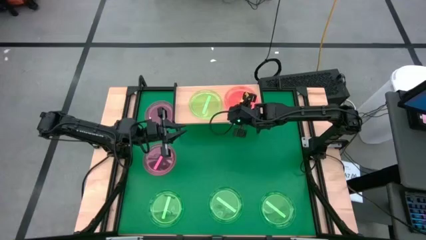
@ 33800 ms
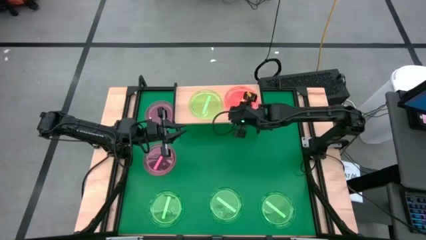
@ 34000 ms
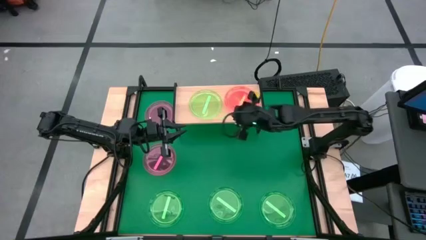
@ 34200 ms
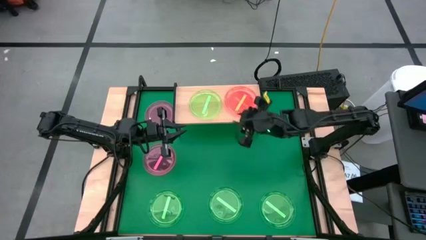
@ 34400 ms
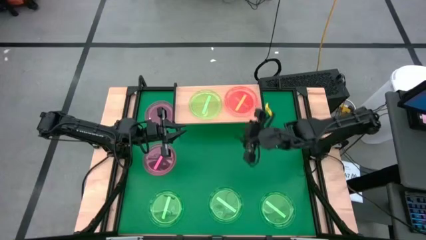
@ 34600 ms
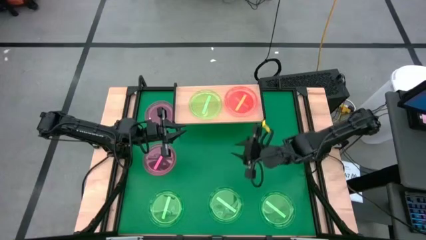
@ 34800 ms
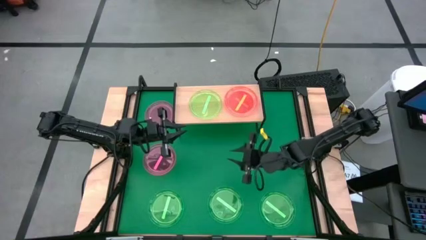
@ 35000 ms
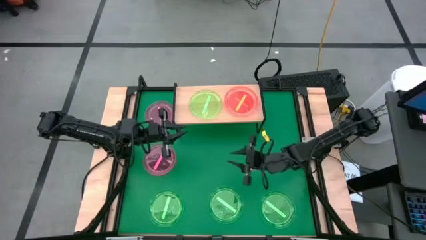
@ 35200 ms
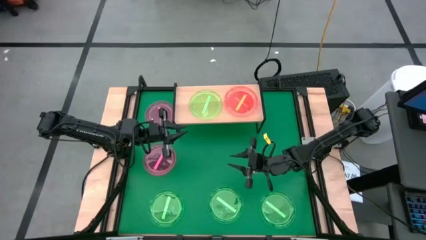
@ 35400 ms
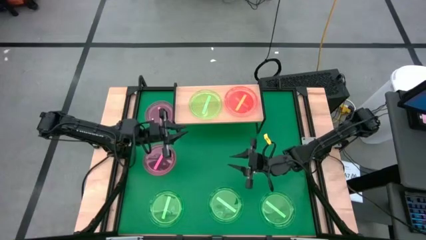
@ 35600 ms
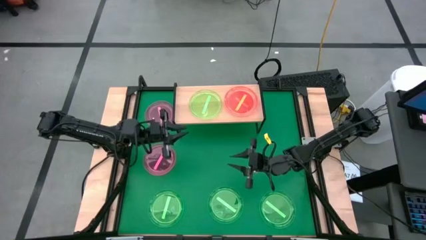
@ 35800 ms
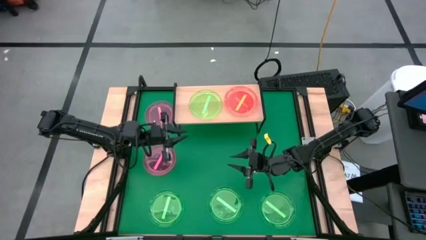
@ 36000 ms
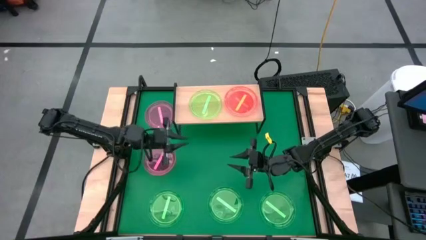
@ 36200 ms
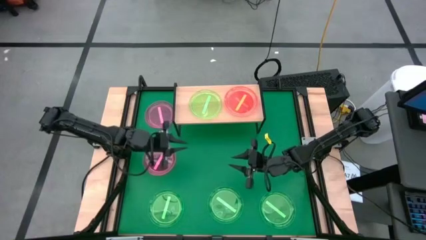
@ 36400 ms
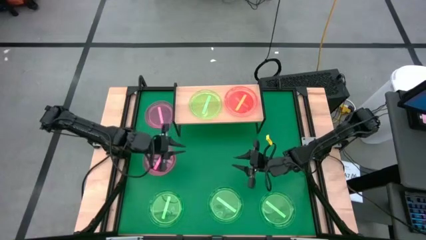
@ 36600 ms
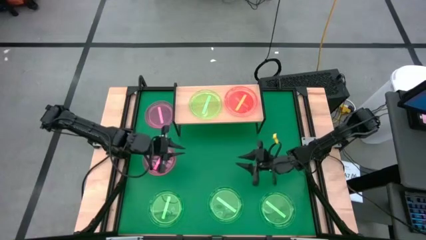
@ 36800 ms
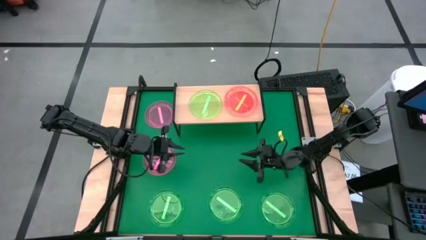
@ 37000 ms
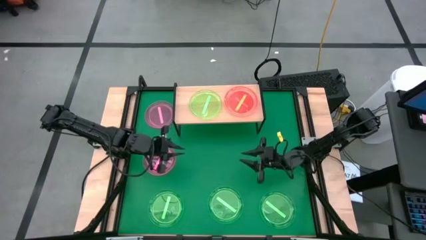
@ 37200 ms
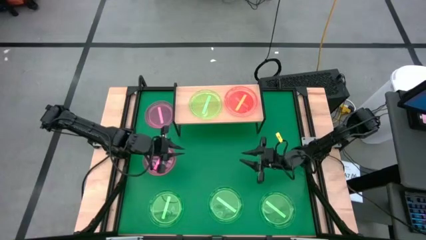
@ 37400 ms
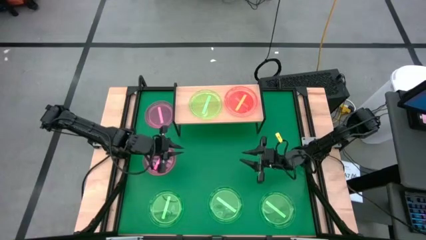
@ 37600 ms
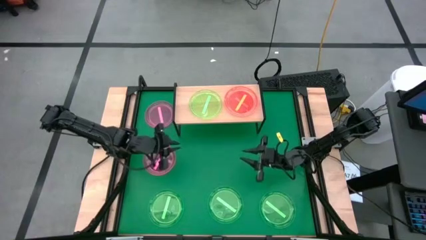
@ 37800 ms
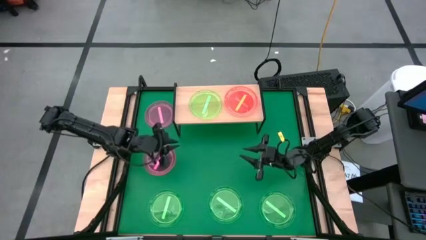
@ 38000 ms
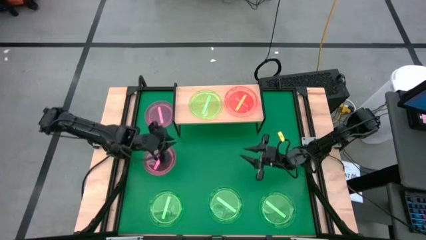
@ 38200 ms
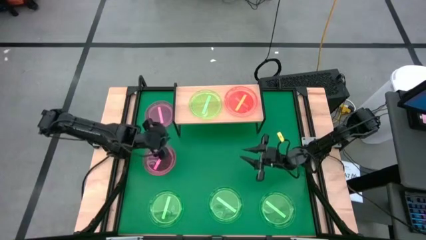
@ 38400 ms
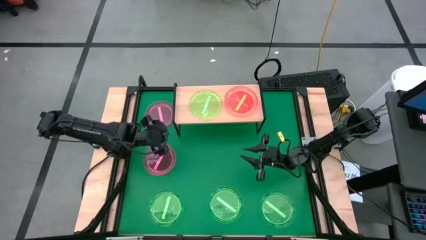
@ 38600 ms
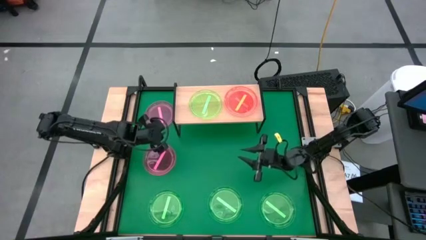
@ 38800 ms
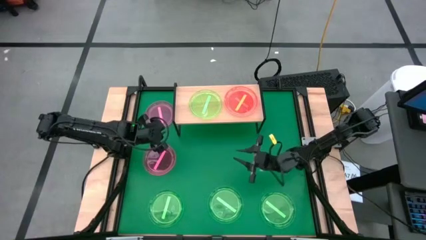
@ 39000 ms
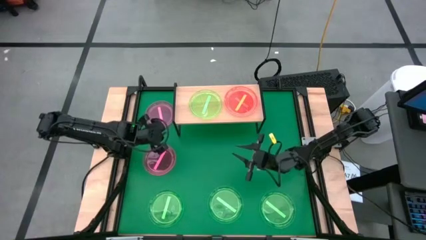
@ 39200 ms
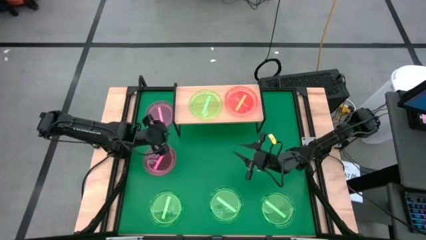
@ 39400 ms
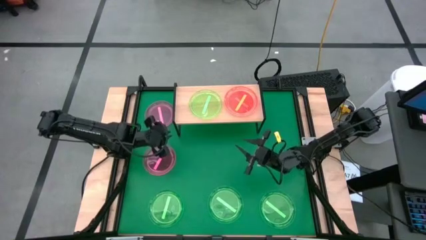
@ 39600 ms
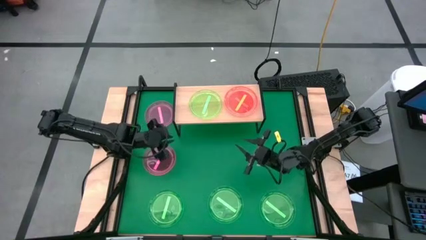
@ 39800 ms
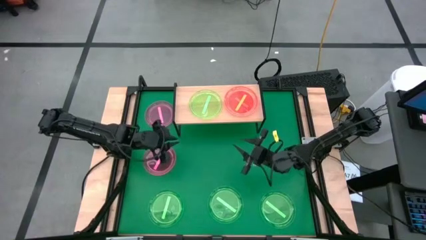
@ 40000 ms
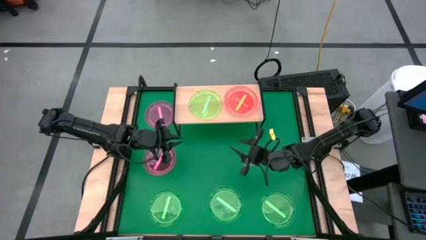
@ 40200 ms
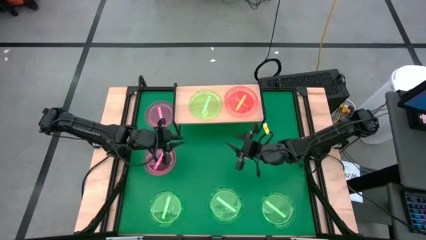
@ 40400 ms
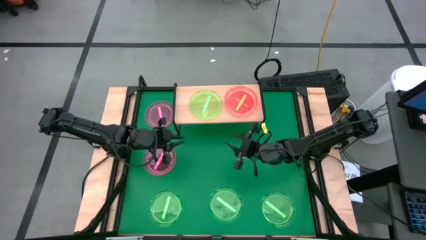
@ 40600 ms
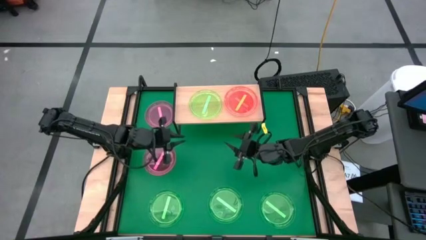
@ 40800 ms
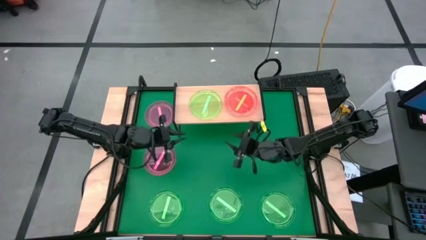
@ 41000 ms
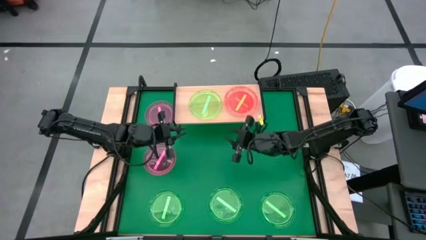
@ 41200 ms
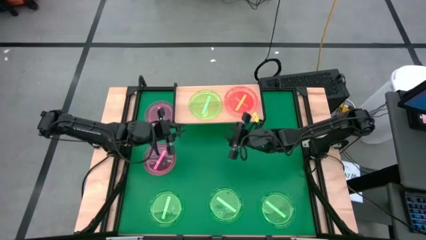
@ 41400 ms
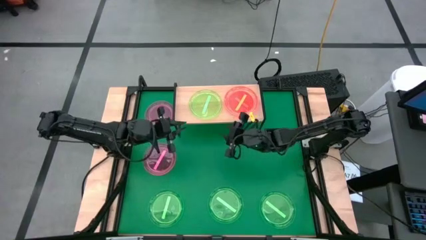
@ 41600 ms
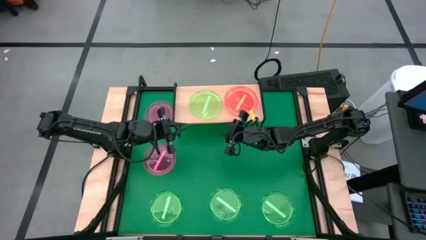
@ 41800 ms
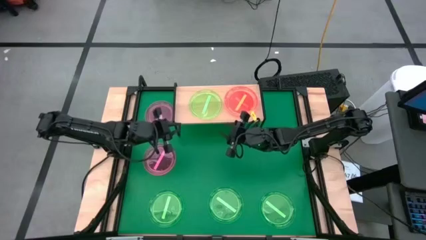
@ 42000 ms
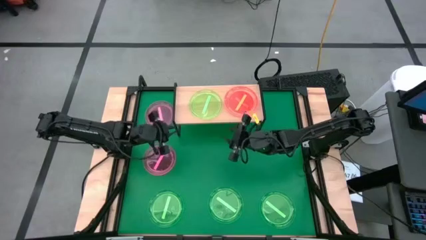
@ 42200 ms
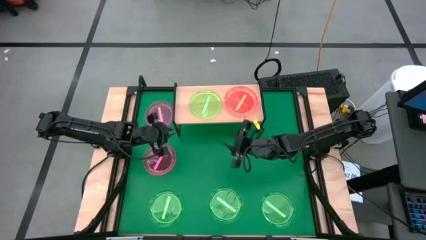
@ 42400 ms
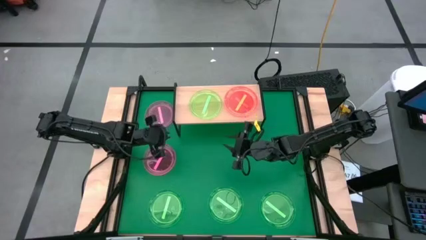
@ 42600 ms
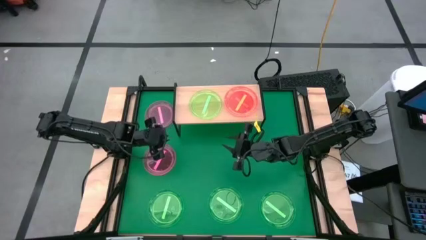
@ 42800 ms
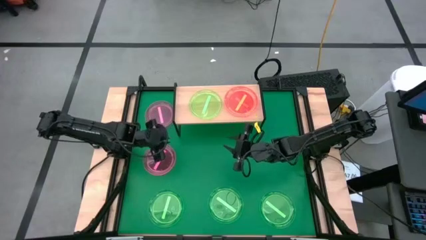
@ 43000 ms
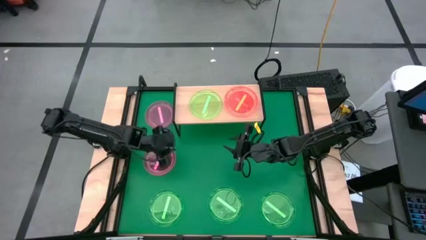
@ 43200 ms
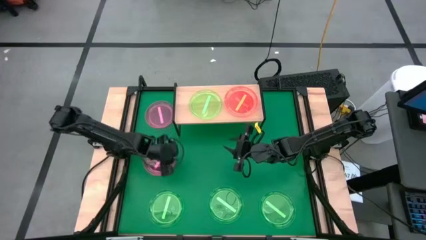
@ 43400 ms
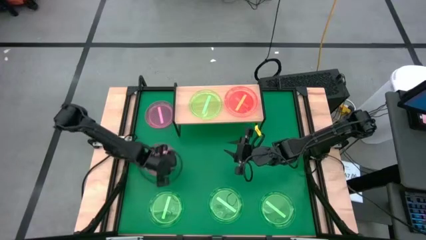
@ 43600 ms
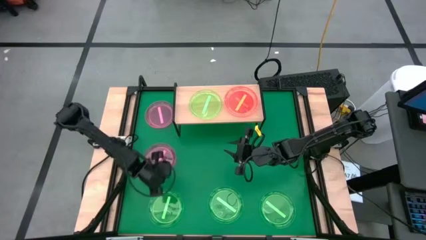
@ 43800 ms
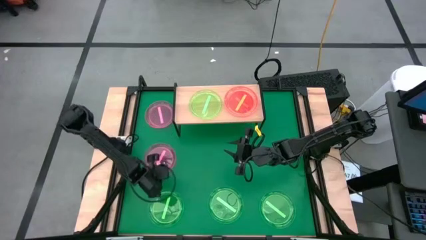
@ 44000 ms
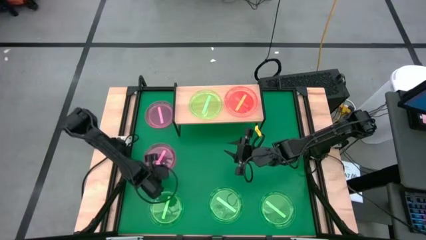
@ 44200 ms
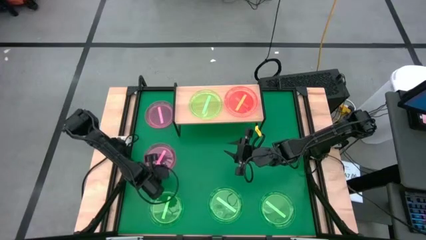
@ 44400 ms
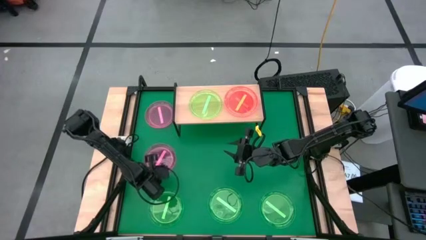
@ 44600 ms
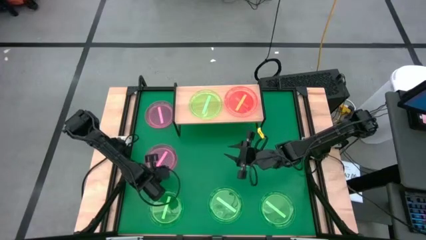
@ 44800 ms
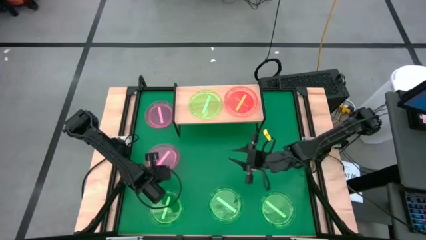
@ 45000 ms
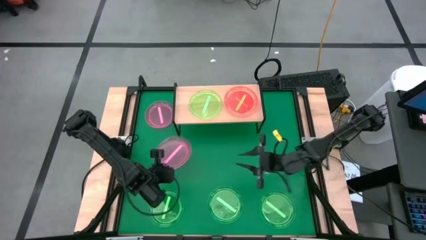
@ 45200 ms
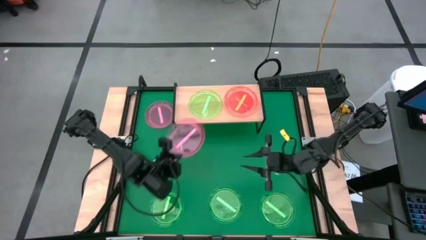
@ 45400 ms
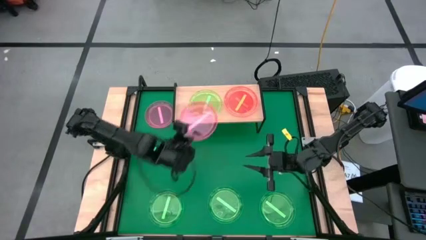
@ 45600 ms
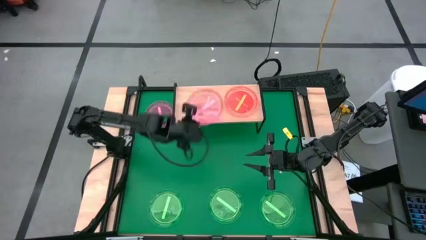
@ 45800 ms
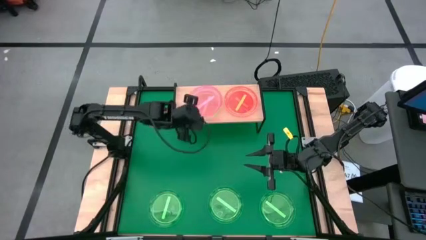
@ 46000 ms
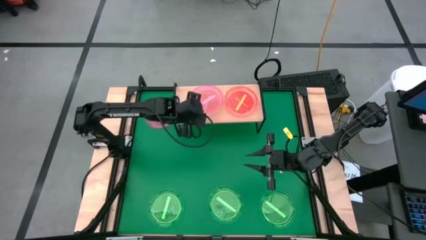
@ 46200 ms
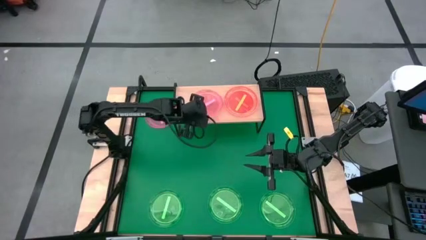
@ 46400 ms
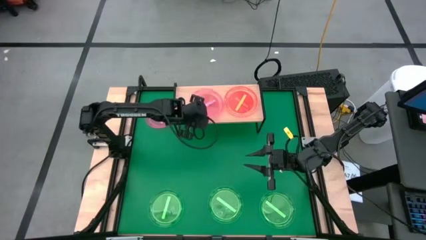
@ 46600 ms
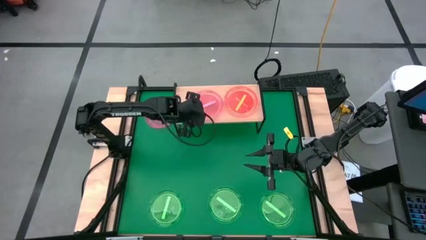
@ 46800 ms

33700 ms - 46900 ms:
Task: Place and stack plates onto a shelf
Stack the bottom pink transparent plate on top of the green transparent plate on the shelf

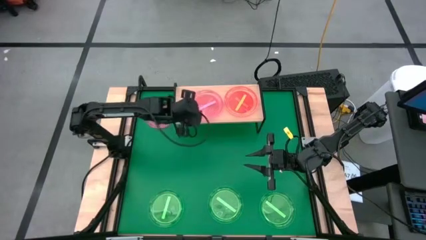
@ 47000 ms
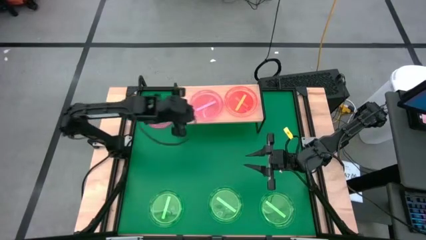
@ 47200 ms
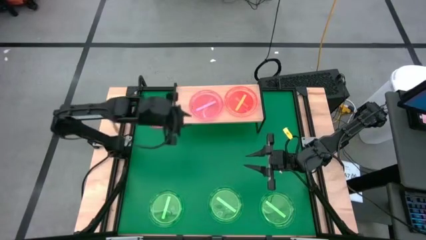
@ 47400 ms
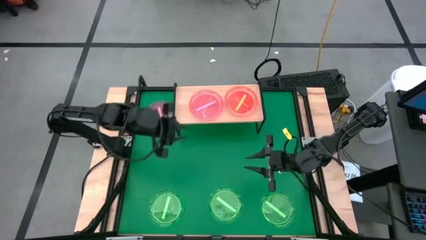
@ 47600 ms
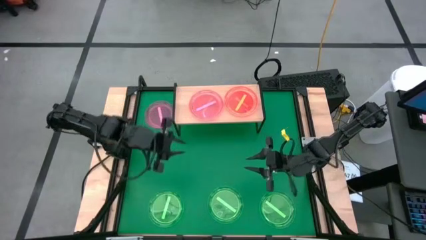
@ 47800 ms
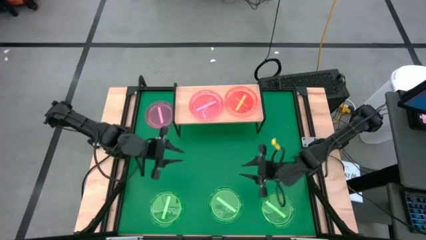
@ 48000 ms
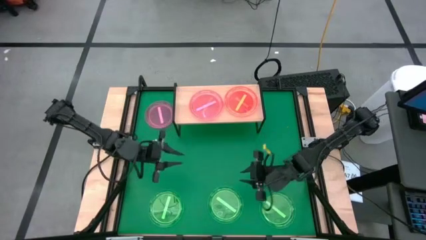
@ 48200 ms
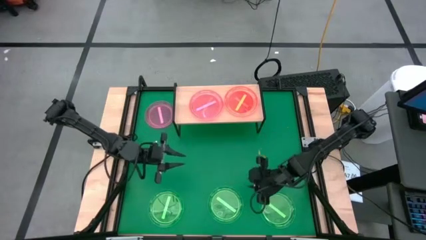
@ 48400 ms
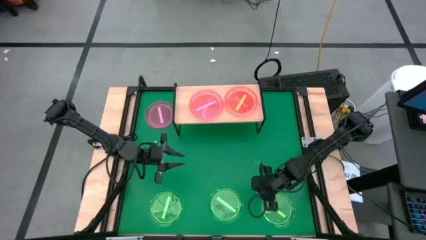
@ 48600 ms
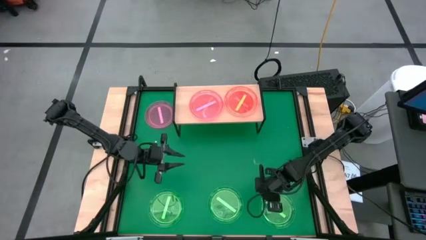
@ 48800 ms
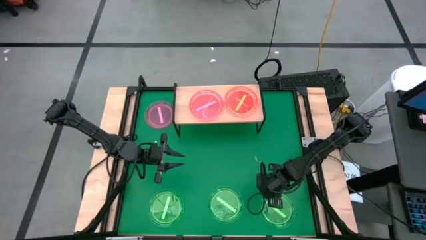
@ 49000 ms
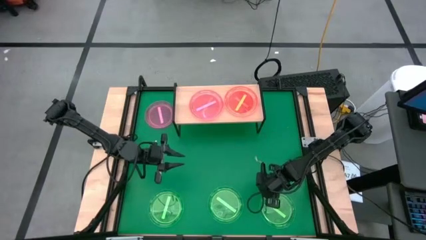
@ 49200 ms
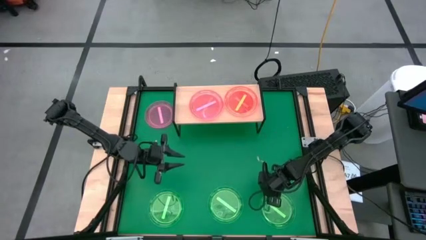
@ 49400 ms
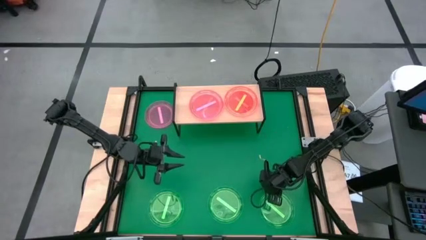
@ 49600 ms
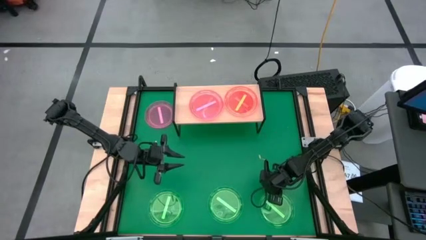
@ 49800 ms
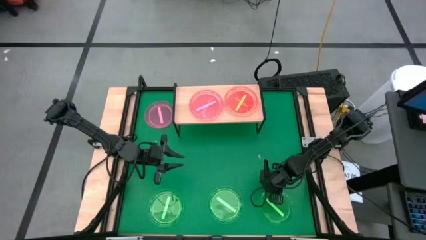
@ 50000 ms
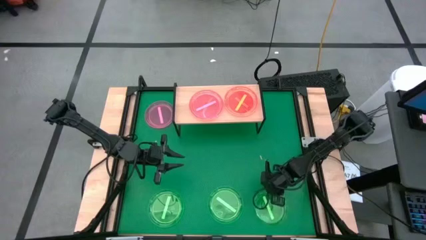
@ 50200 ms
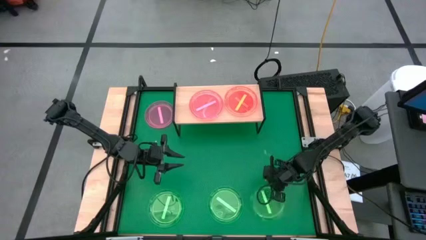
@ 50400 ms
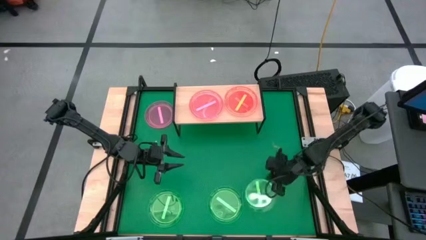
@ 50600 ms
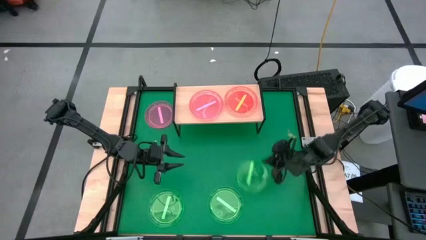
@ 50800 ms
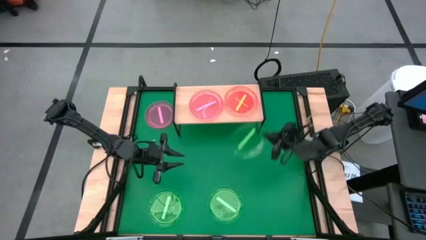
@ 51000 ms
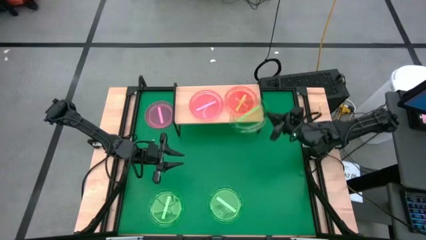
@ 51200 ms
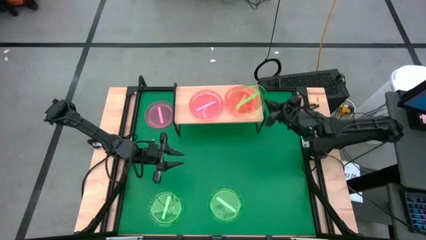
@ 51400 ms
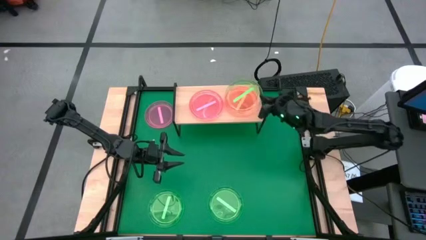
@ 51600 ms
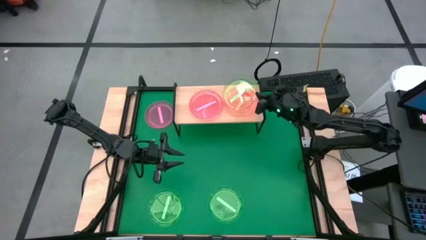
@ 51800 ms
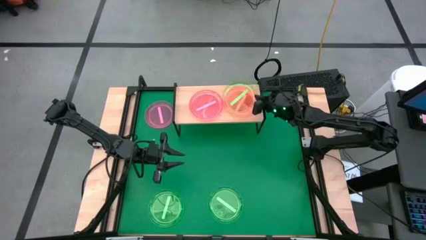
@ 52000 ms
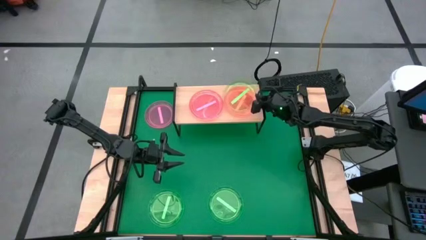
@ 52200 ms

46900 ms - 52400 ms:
Stack the right green transparent plate on top of the orange transparent plate on the shelf
